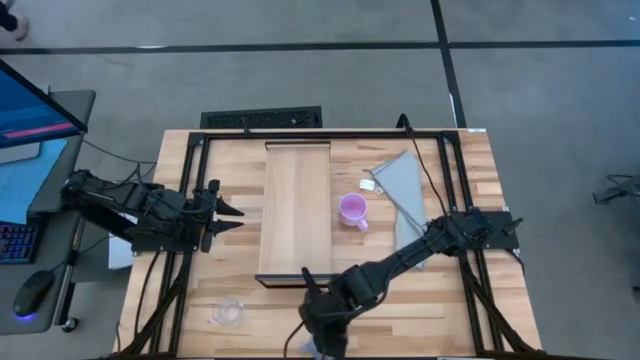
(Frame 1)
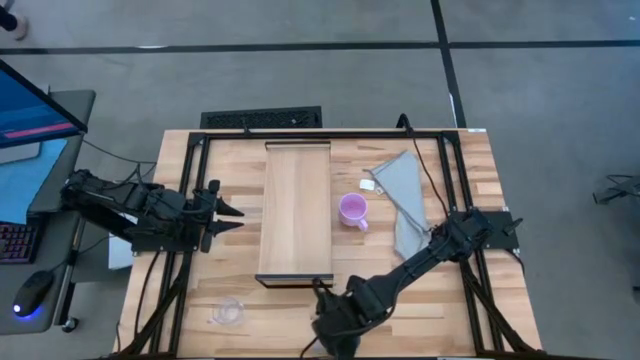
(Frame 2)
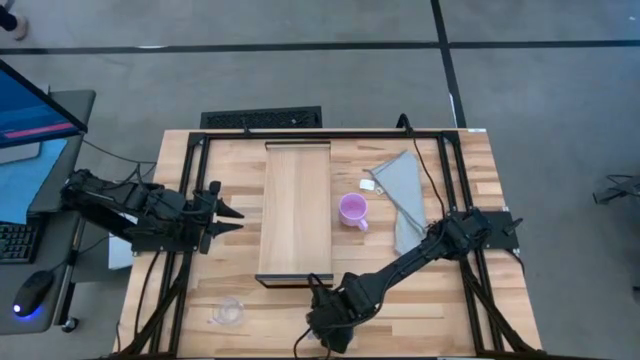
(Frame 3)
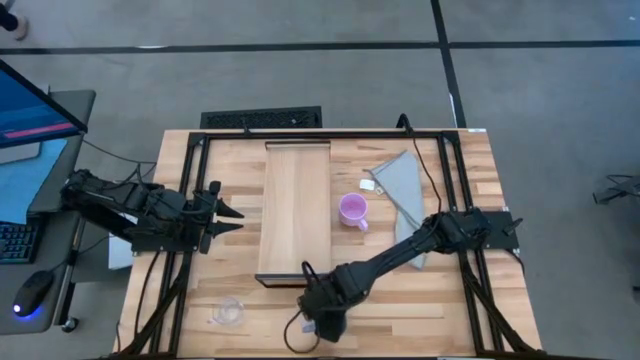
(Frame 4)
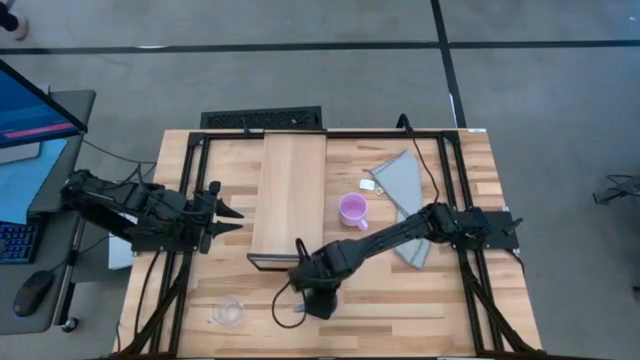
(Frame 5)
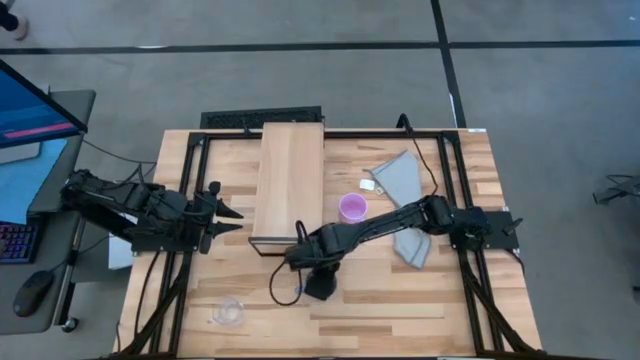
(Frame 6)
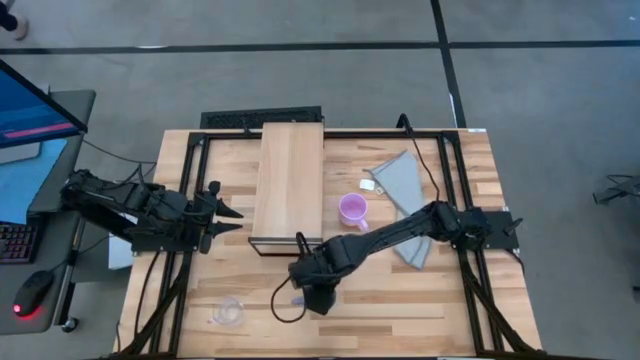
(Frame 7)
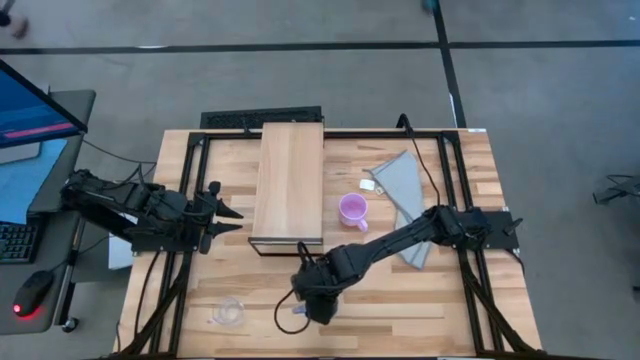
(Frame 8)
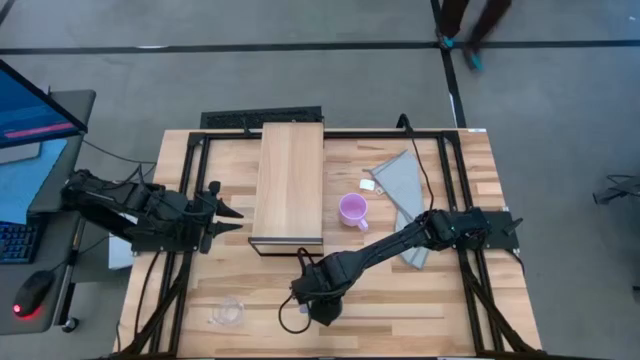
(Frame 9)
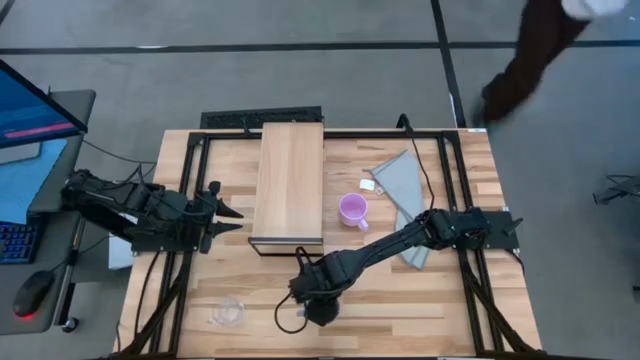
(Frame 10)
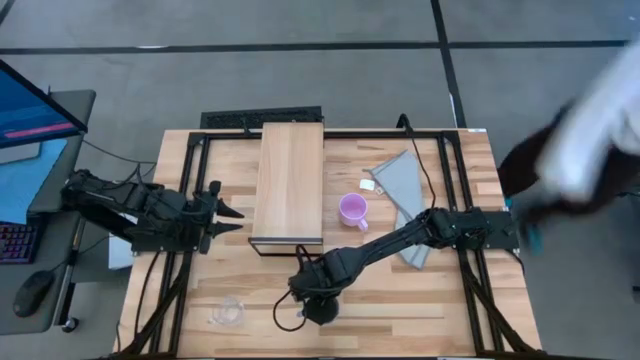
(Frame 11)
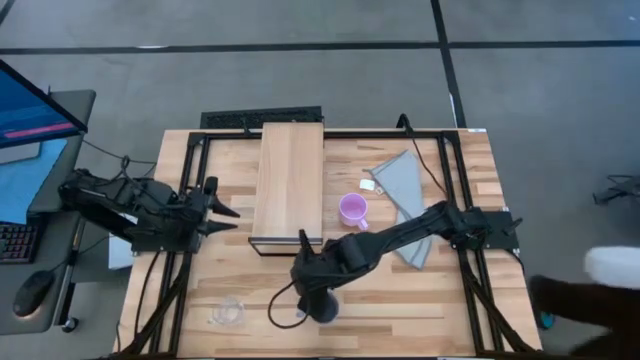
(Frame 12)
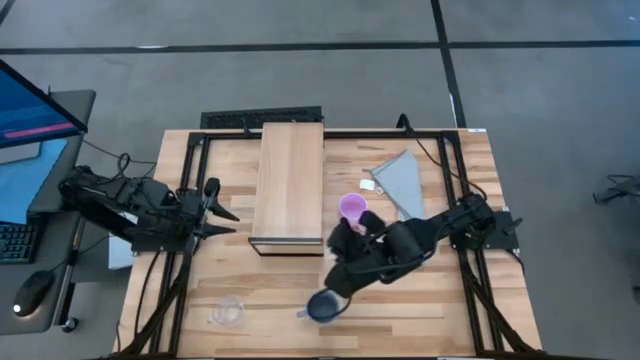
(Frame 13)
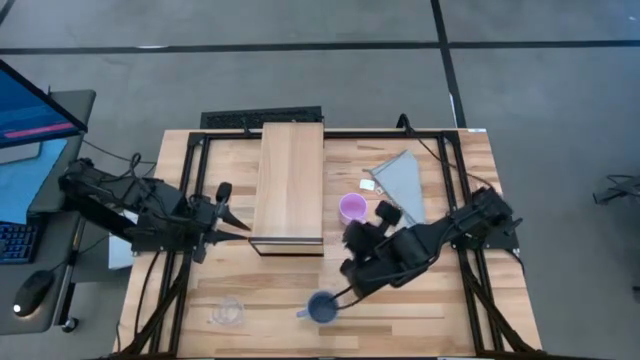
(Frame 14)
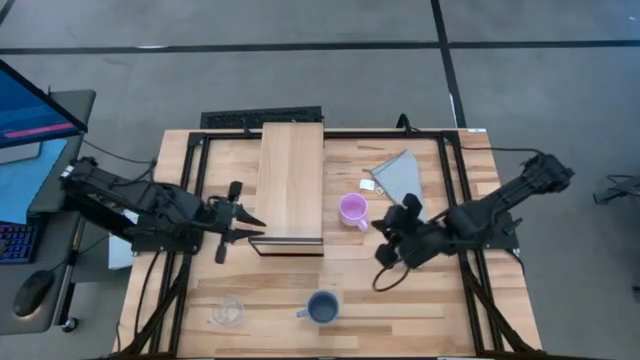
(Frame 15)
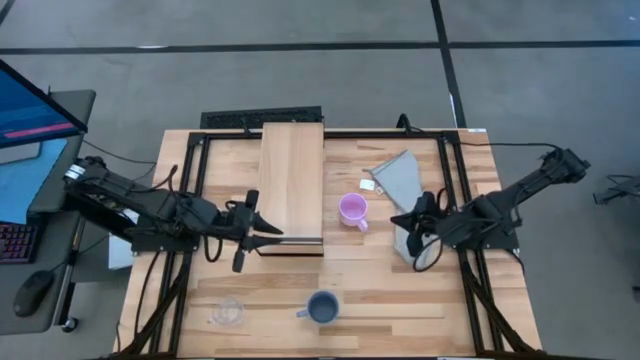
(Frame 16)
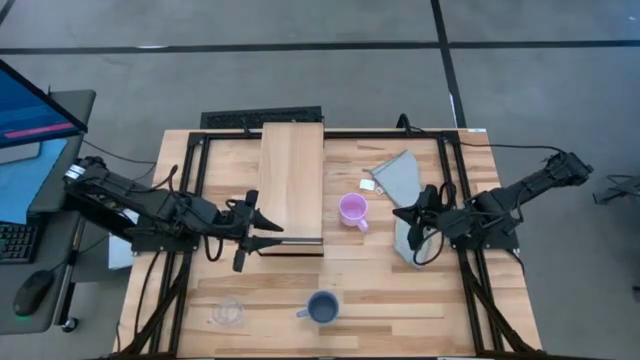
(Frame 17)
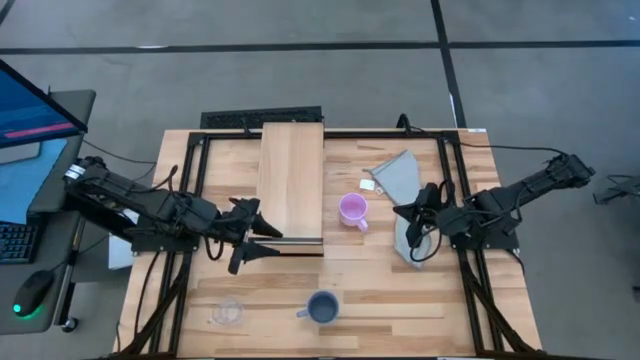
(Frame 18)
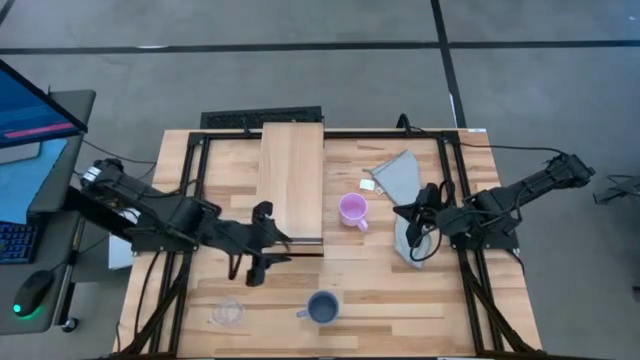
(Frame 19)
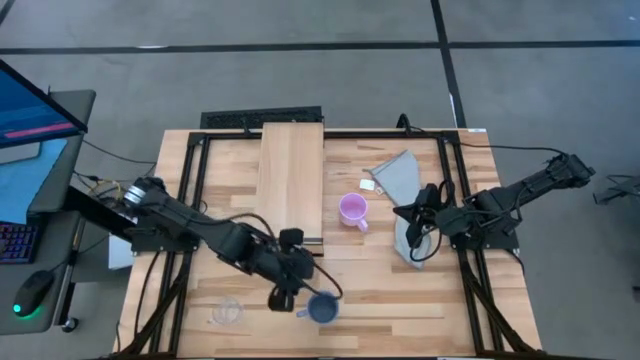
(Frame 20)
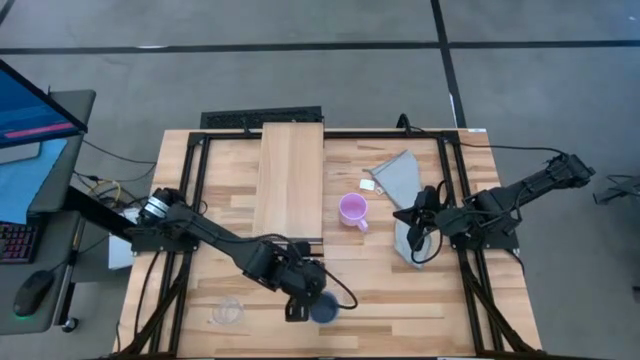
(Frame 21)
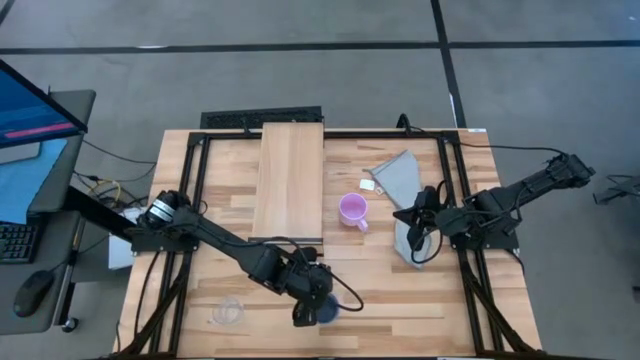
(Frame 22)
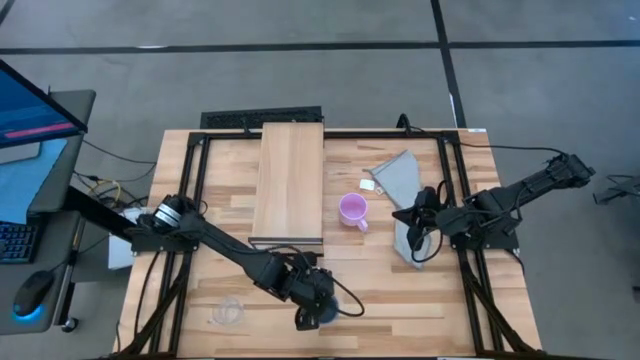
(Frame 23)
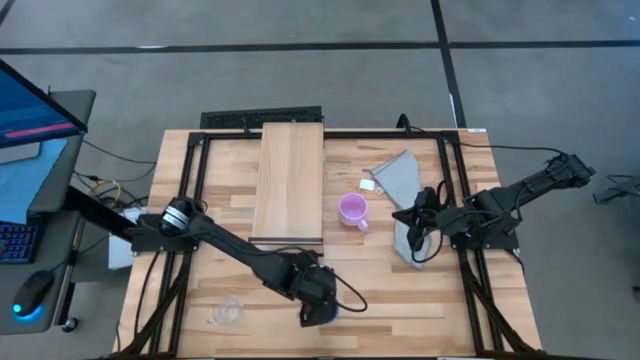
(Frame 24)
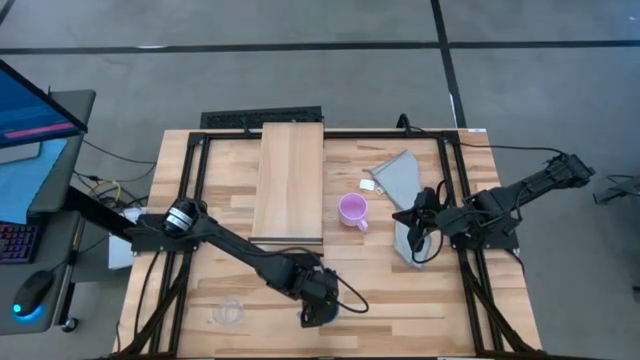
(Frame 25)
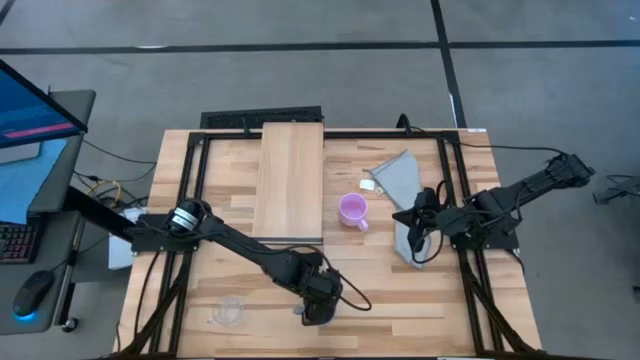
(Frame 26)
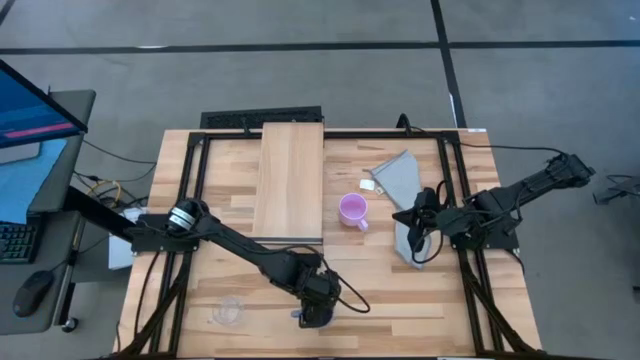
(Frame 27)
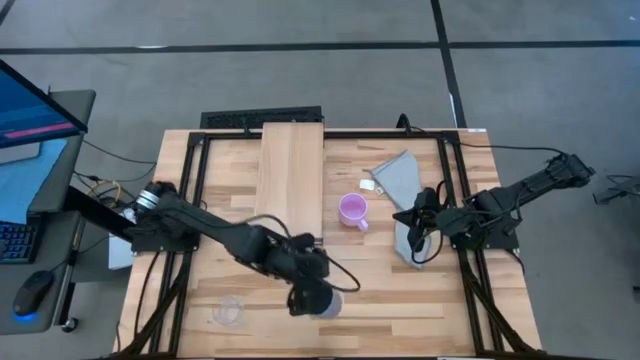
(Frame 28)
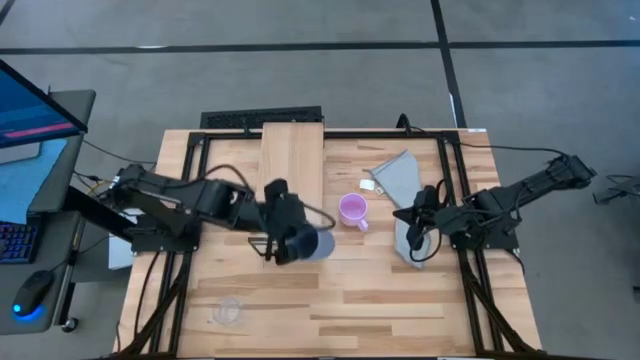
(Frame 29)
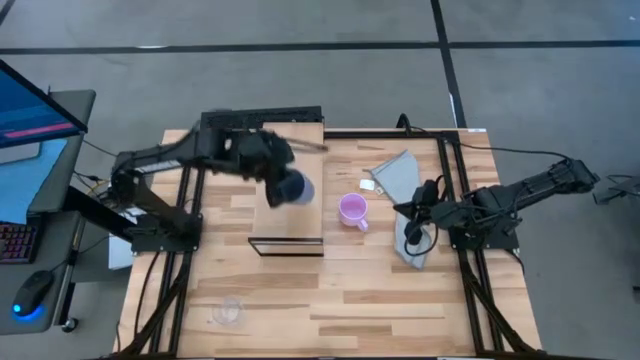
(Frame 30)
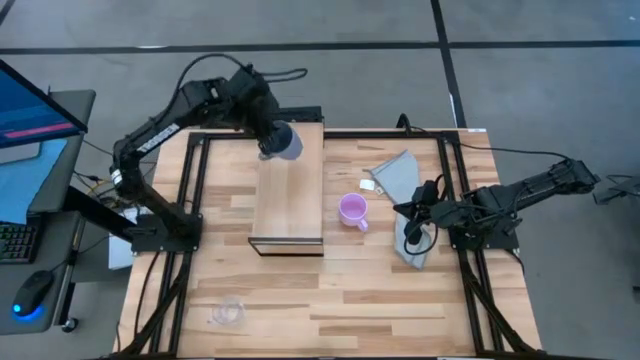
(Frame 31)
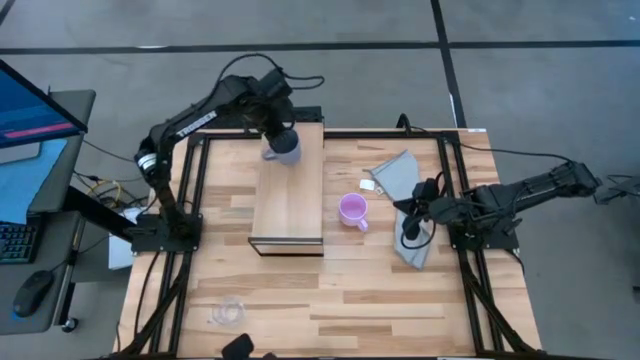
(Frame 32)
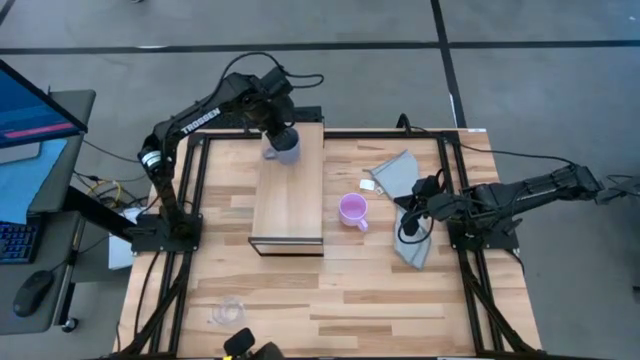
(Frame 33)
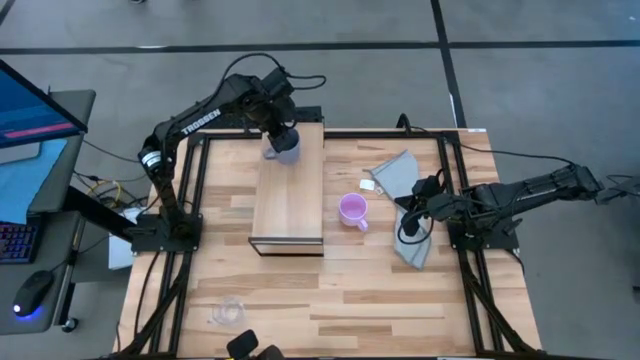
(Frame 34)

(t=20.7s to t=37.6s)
Task: Stack small to large cups/mugs on shelf
Put the blue mug on the shelf

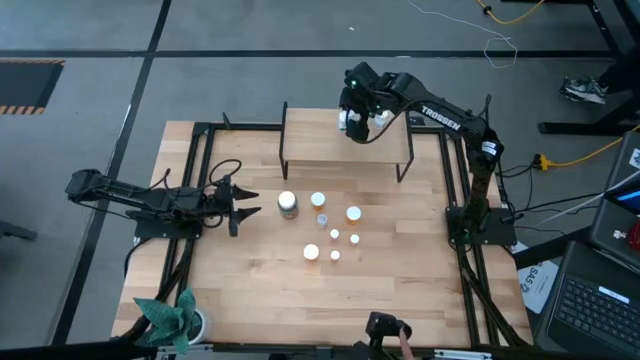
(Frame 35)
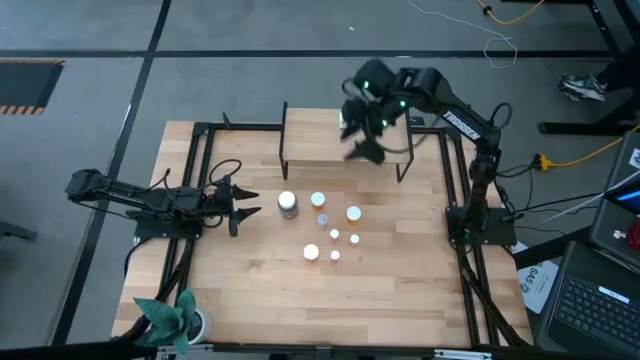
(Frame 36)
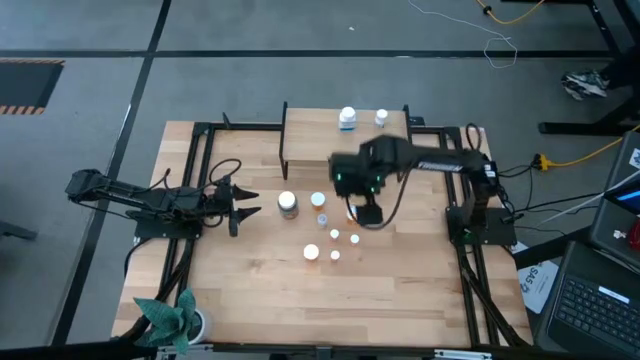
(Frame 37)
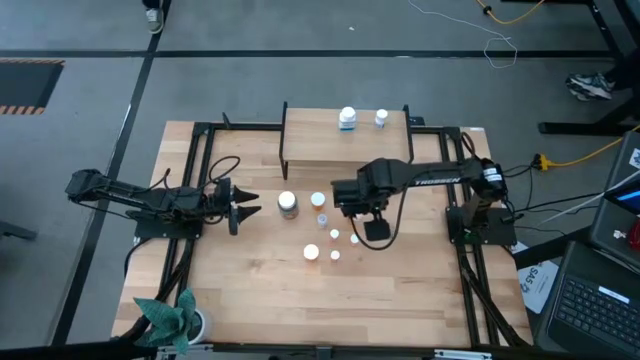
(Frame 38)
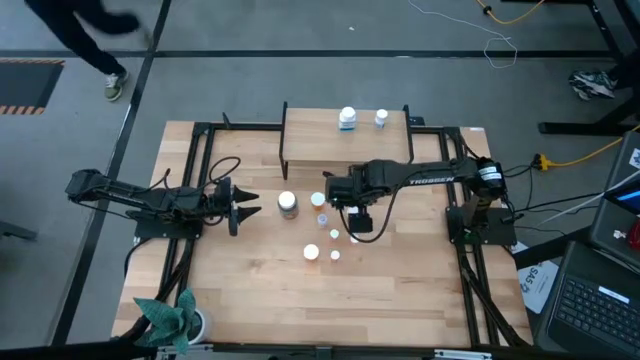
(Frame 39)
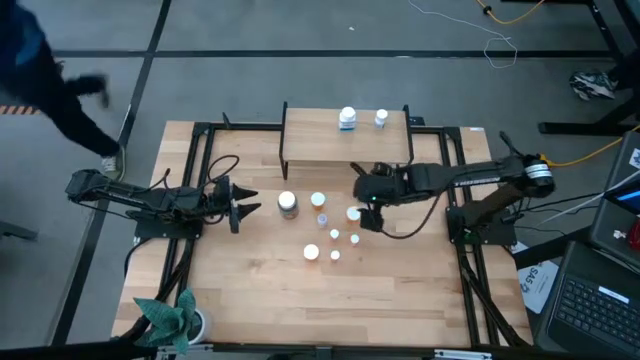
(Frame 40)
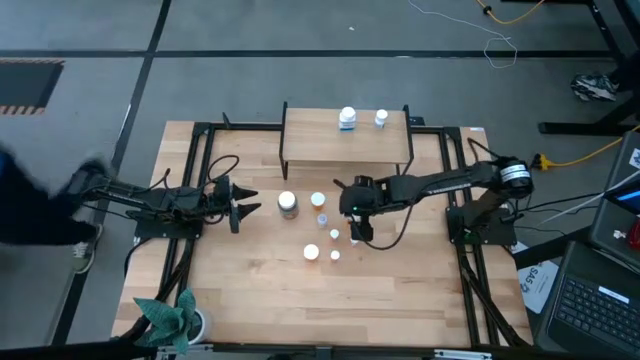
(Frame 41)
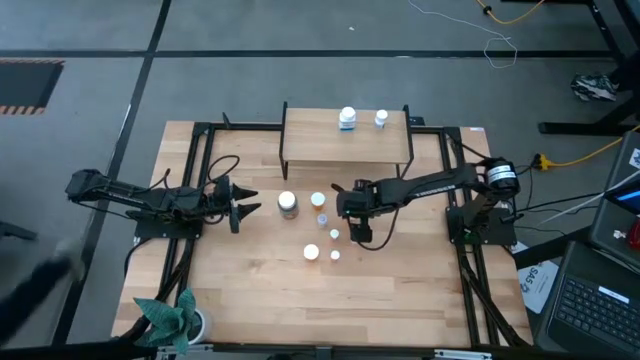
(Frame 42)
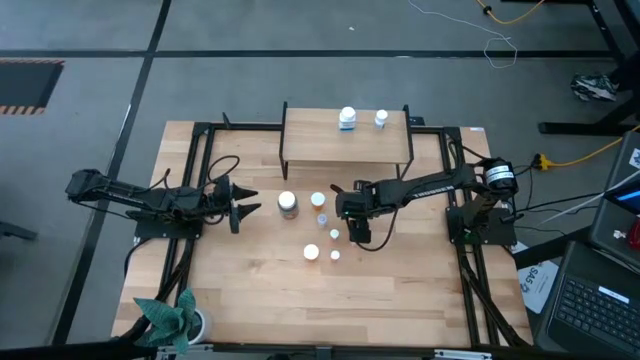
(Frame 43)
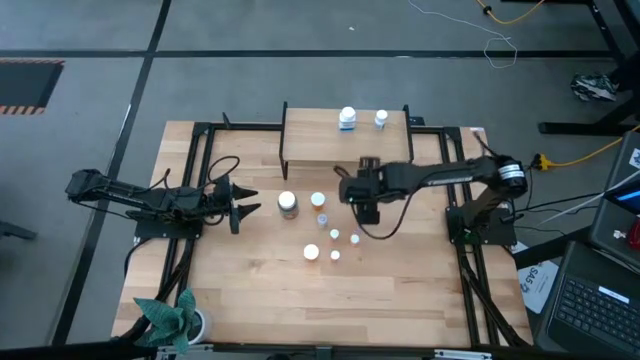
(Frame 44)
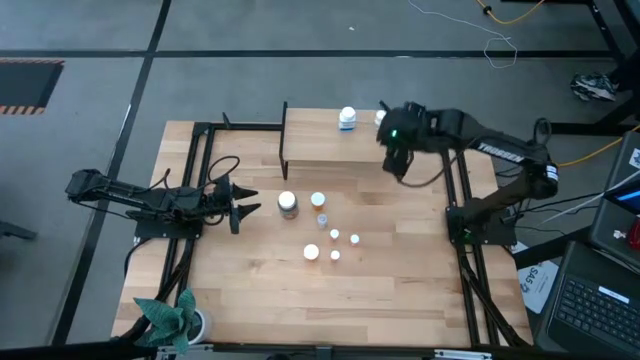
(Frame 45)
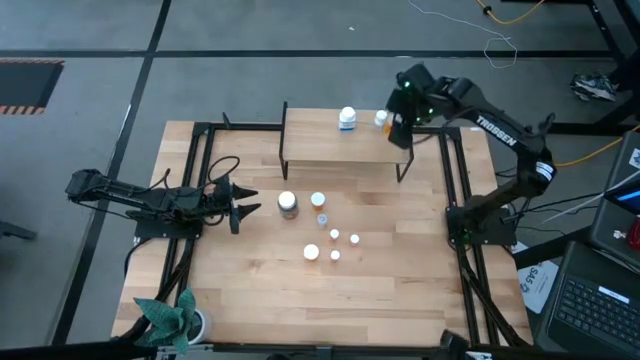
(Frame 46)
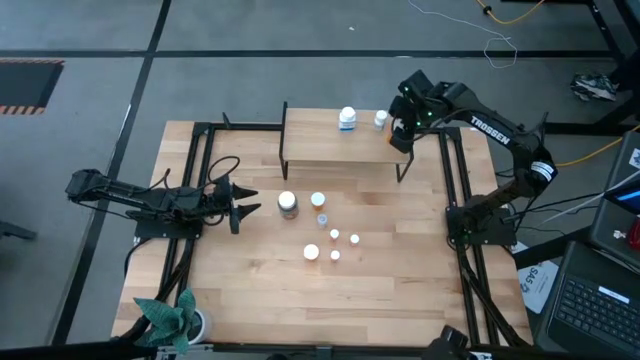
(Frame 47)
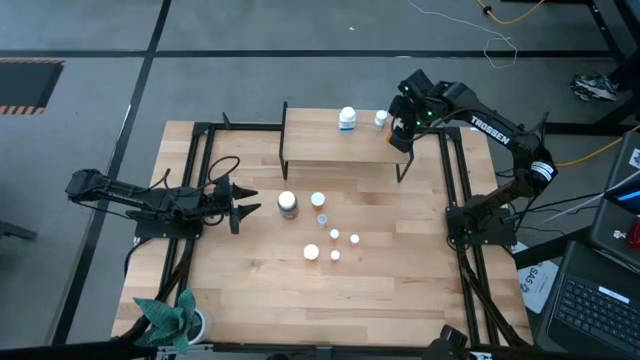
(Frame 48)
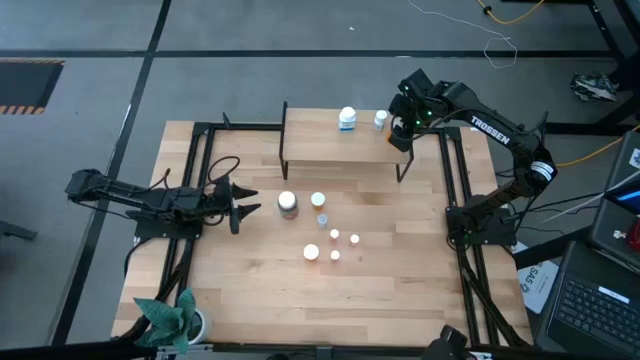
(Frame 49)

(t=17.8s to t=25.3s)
Task: Pick and place medicine bottles onto shelf by color
Put the top right orange pill bottle on the shelf
